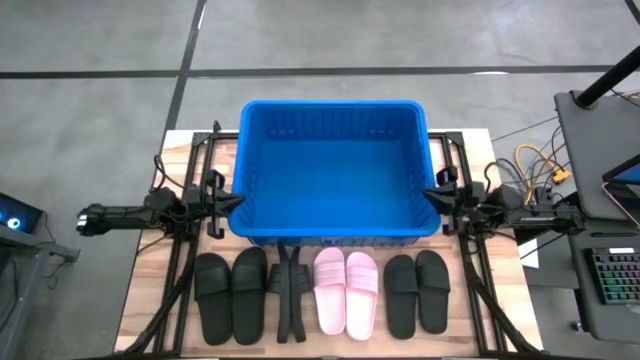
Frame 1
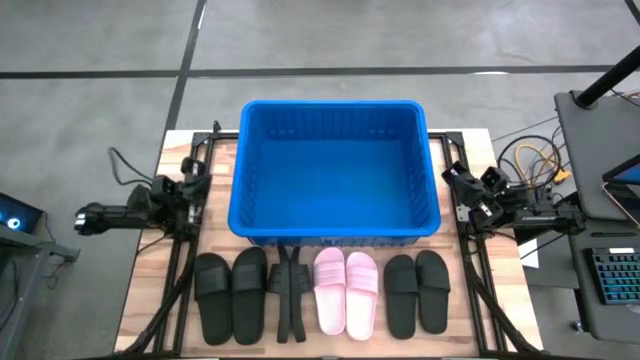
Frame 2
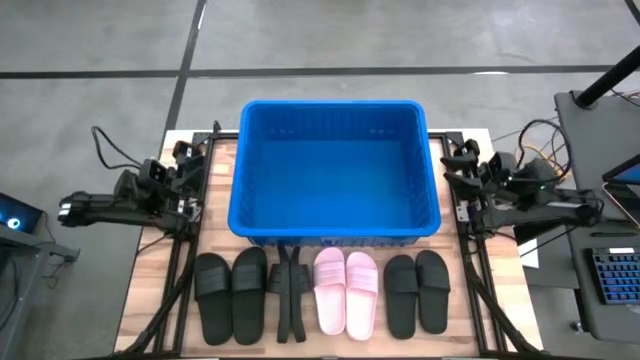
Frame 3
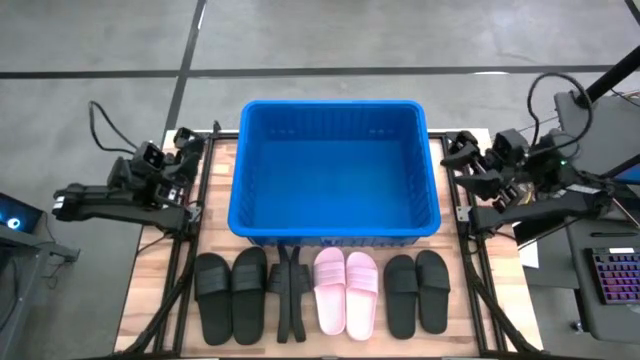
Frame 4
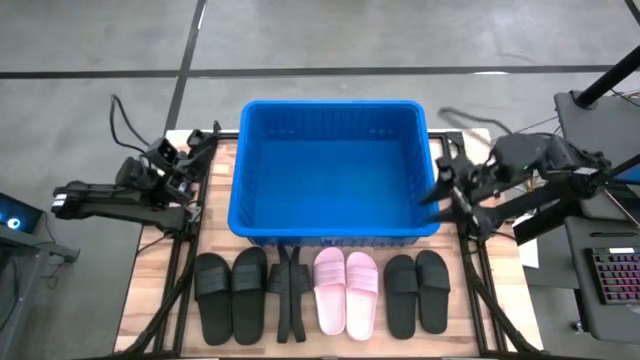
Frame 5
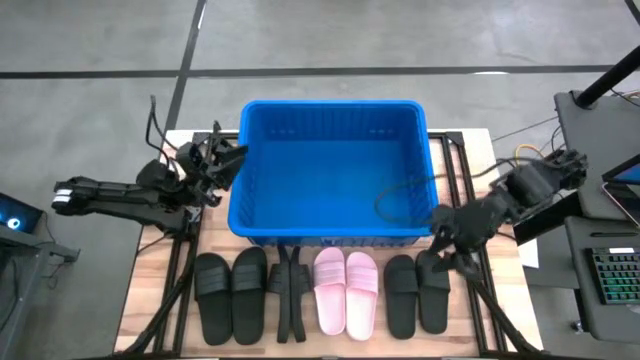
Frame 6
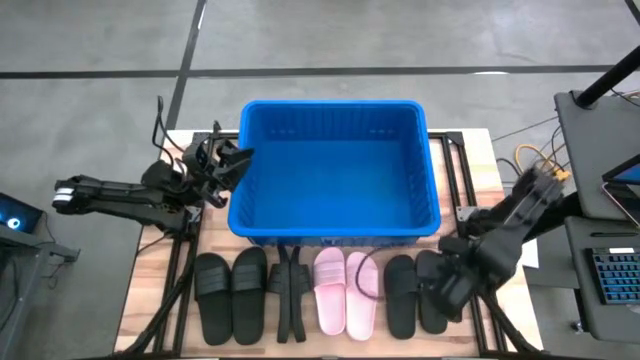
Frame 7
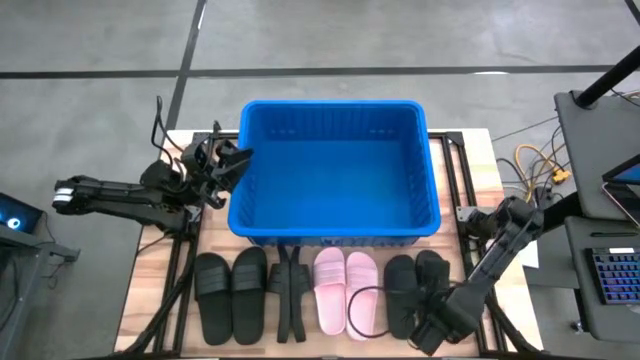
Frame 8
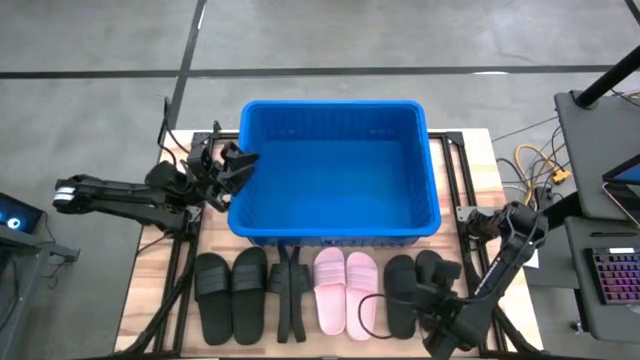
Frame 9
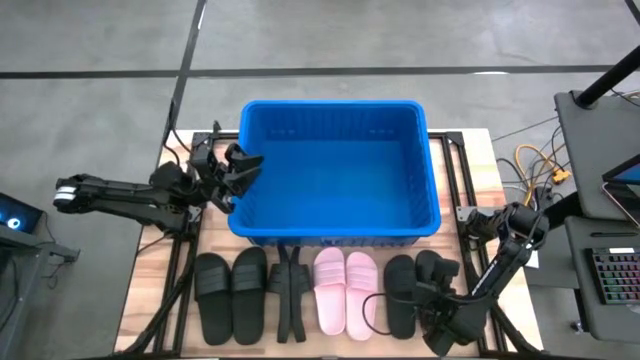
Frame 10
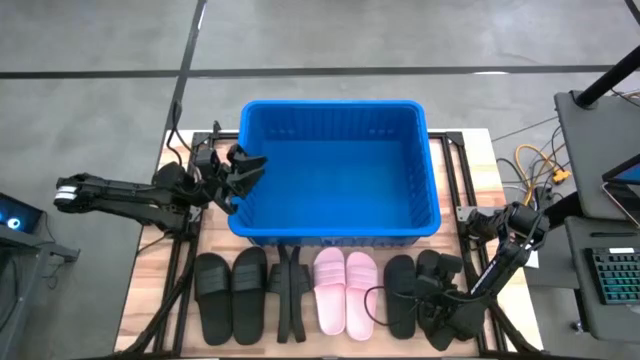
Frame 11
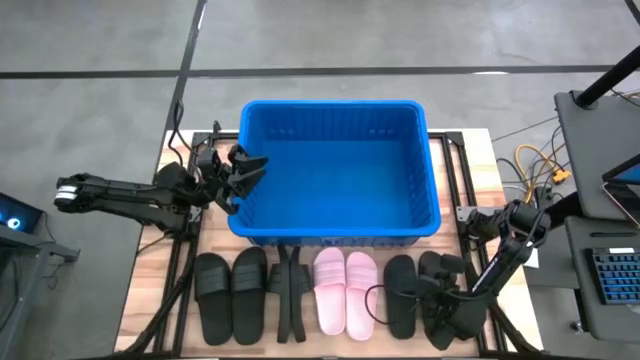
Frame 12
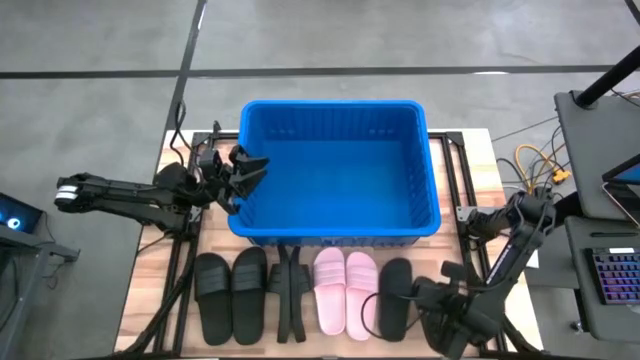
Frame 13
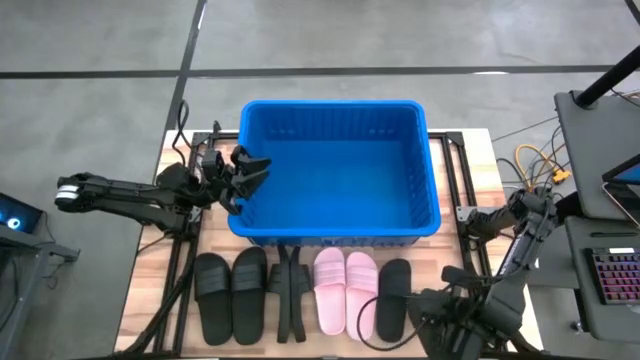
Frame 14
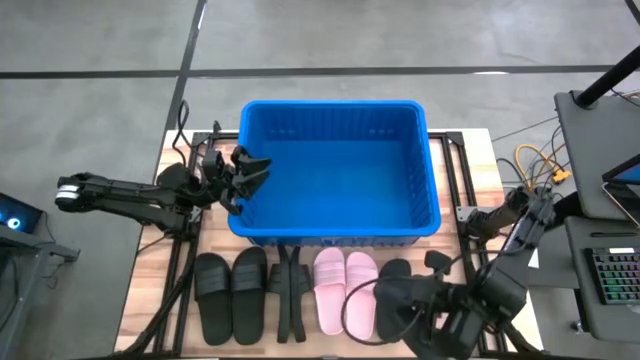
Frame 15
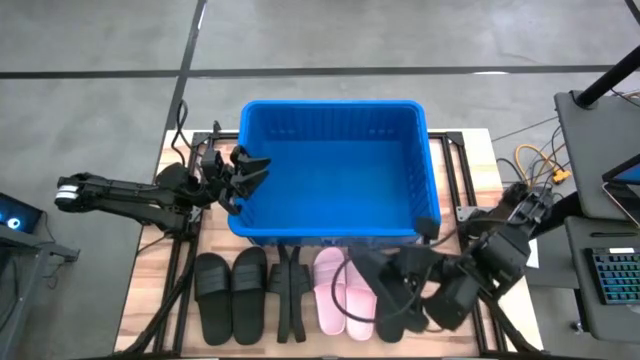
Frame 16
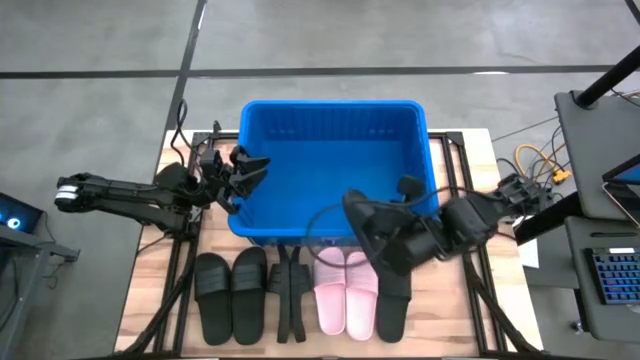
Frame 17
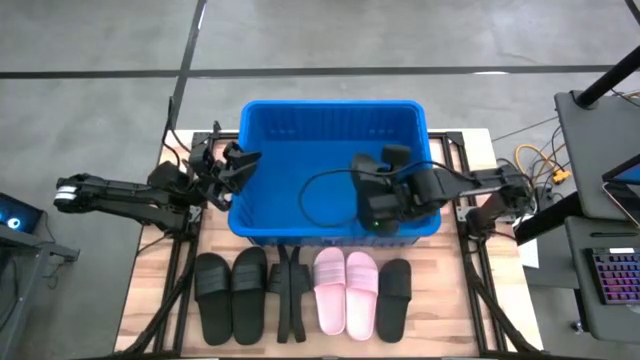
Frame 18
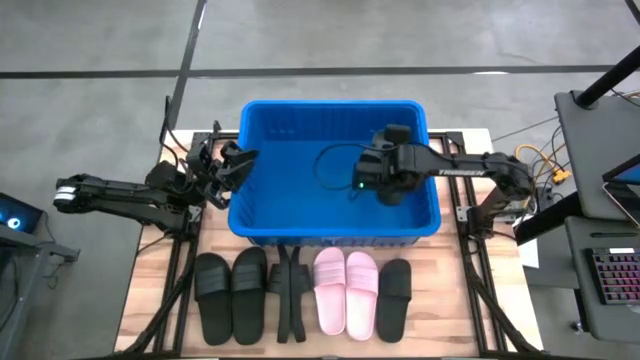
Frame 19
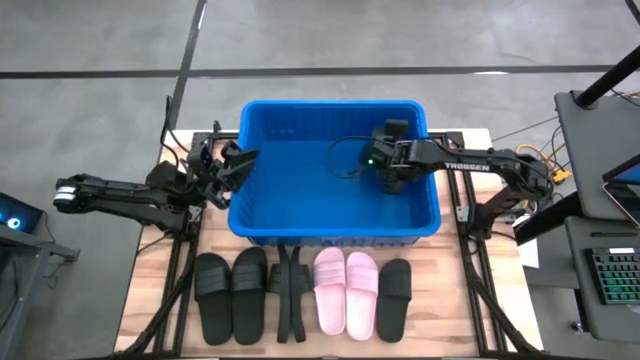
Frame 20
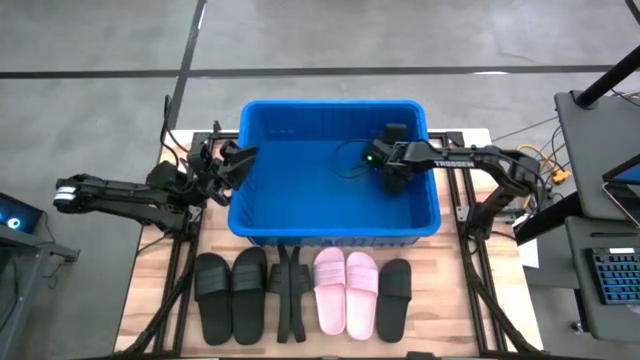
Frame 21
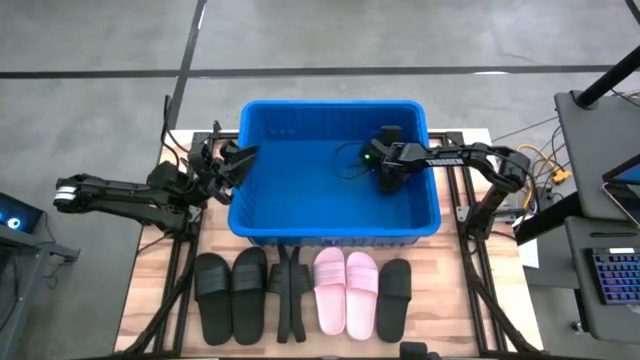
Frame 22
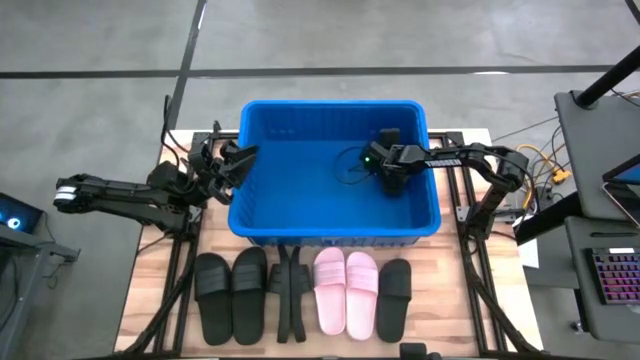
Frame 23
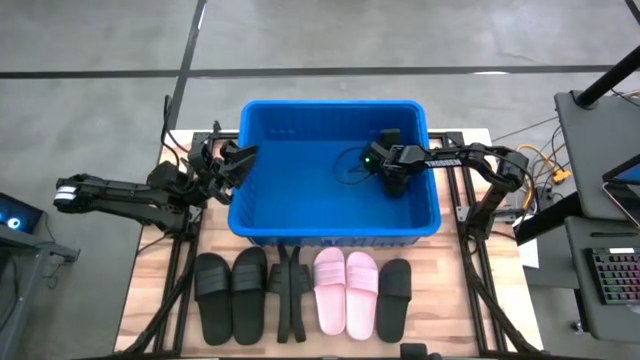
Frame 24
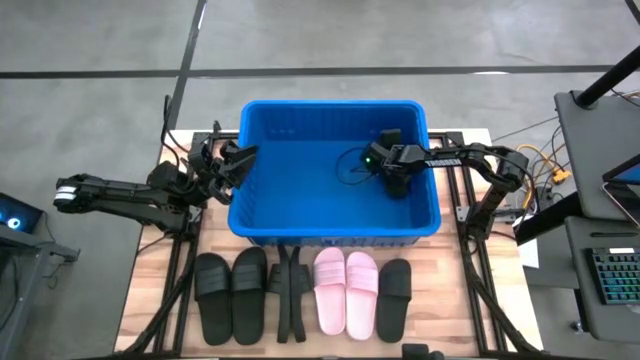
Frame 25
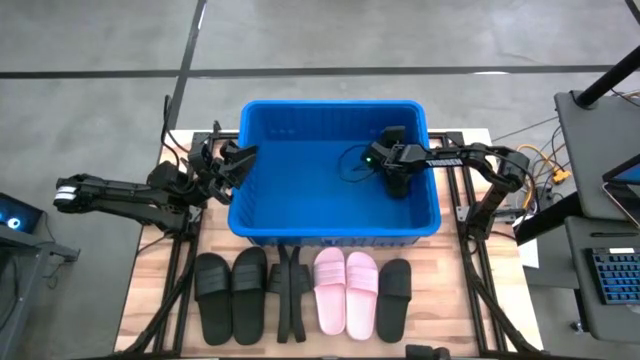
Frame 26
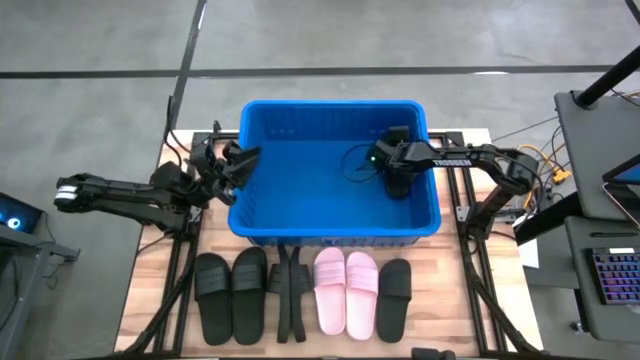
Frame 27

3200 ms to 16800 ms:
Task: Pick and place slides into bin
Put the black slide into the blue bin

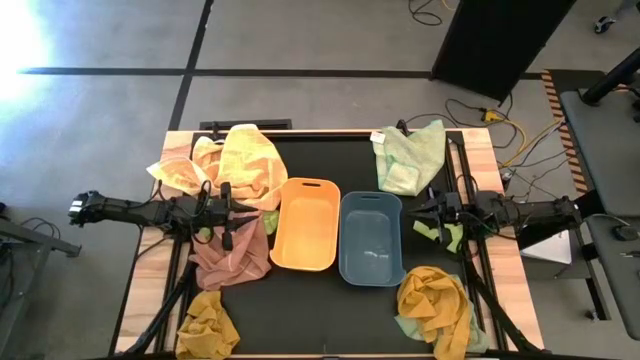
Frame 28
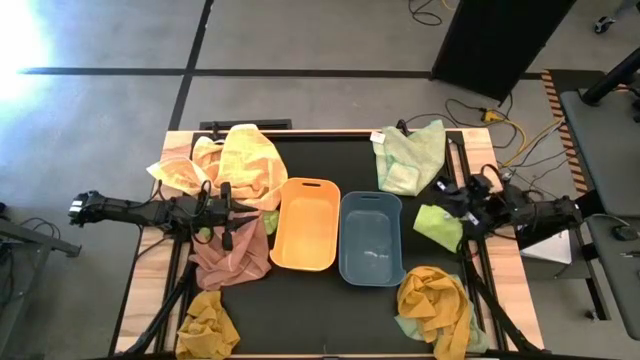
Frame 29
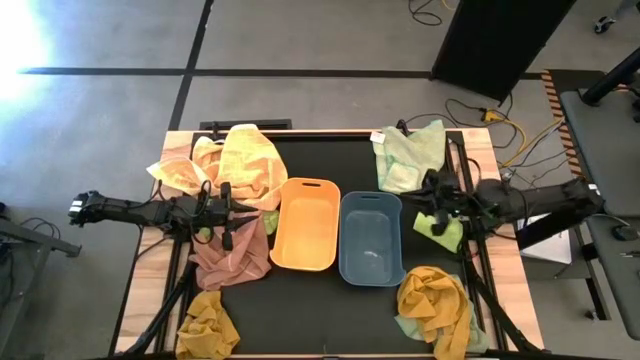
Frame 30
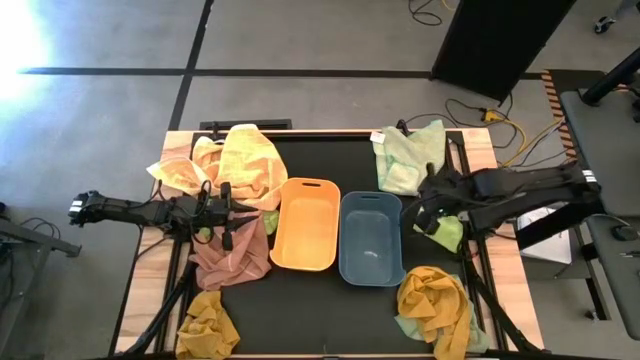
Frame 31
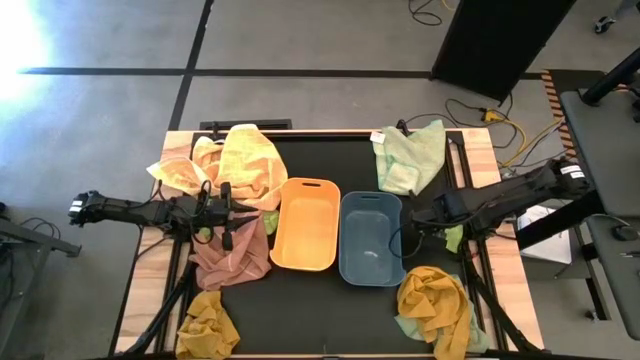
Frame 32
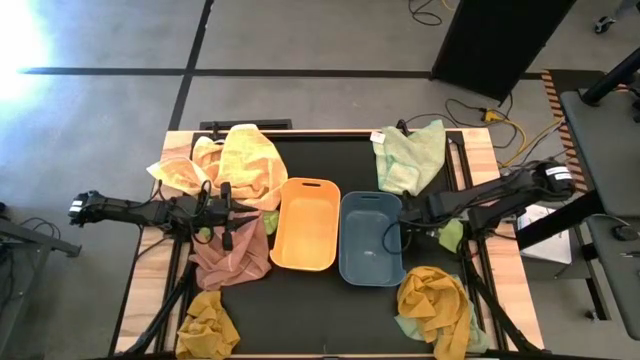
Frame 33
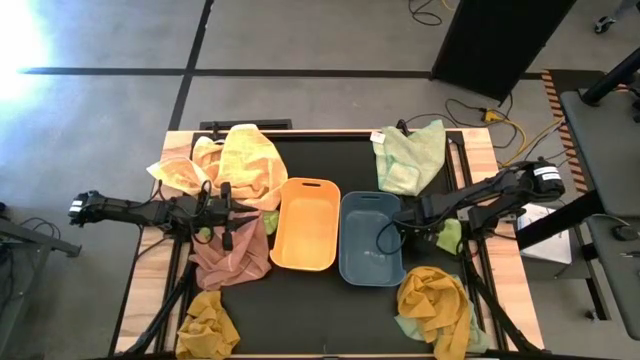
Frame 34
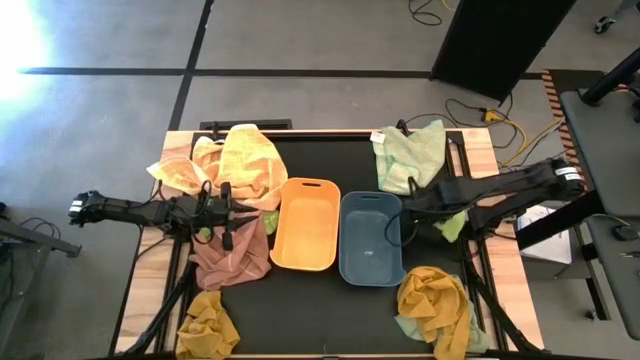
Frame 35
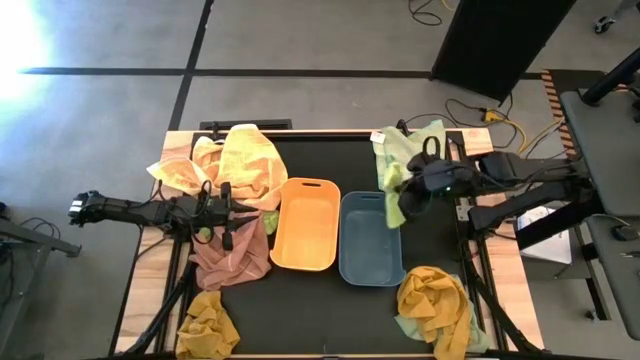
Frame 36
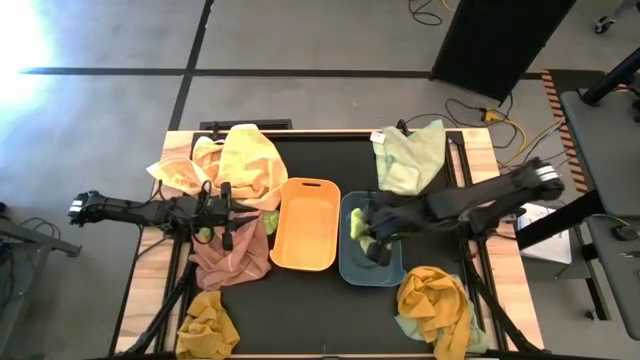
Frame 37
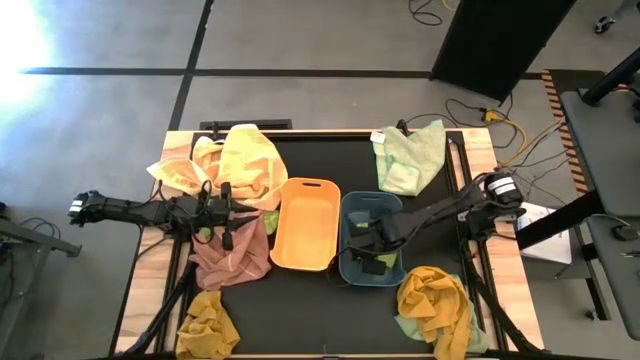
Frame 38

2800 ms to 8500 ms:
Task: Sort towels by color in basket
Put the light green towel into the blue bin
